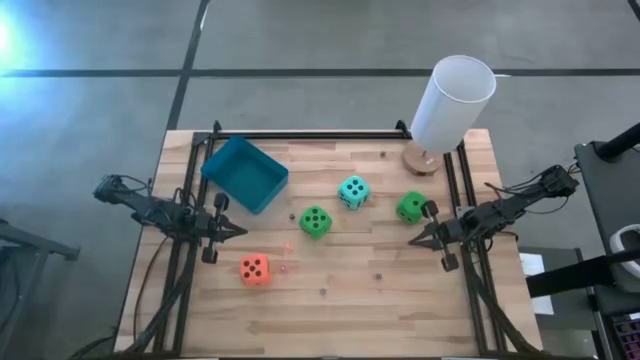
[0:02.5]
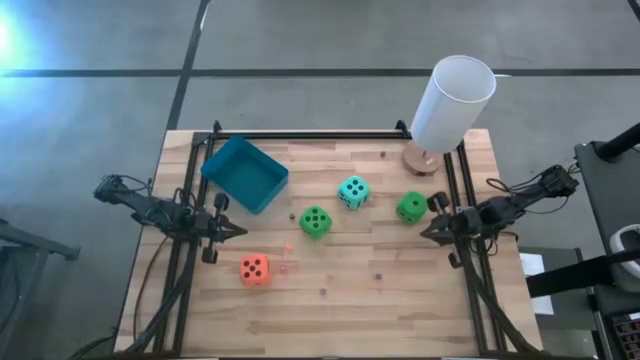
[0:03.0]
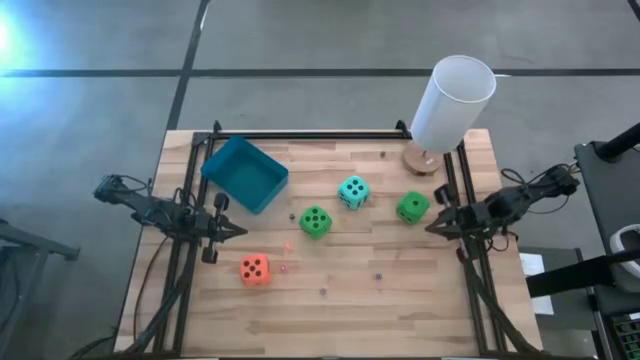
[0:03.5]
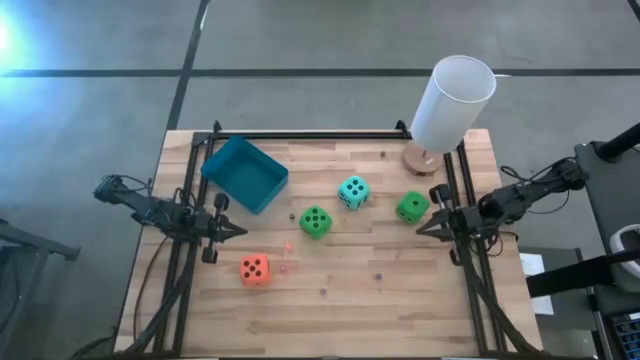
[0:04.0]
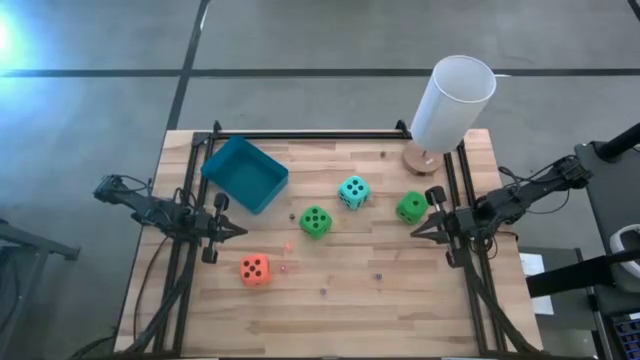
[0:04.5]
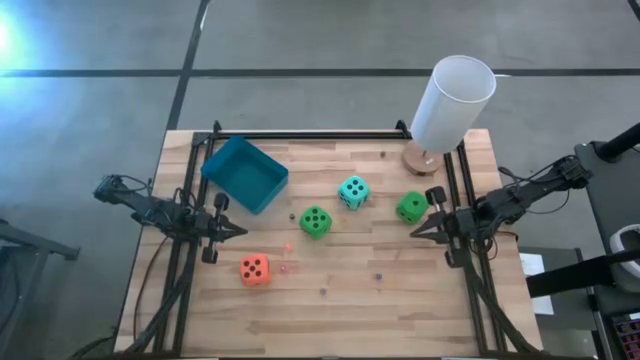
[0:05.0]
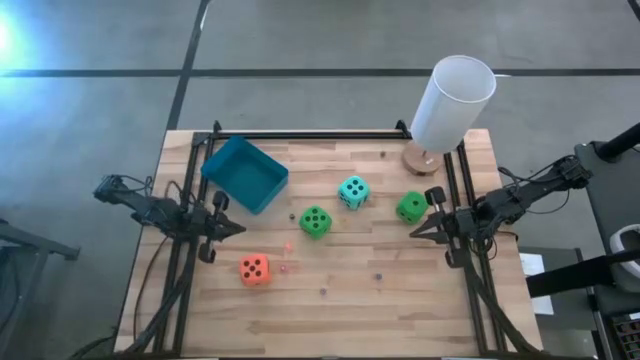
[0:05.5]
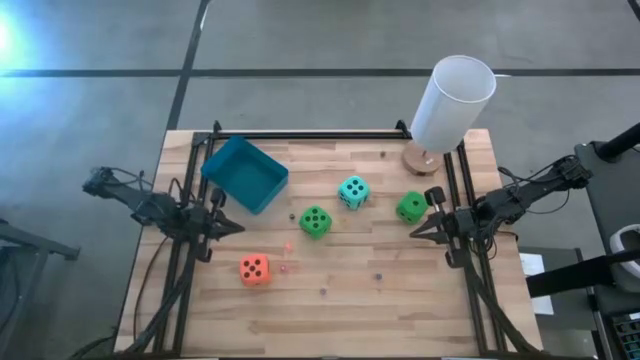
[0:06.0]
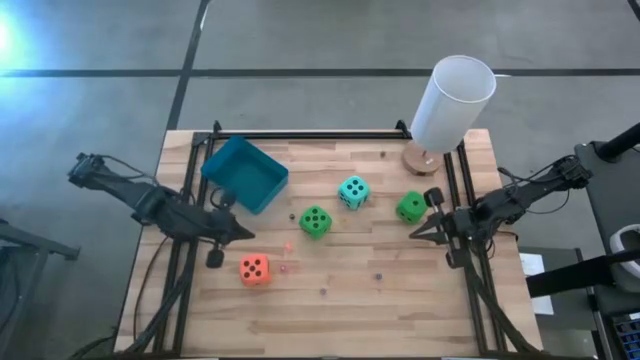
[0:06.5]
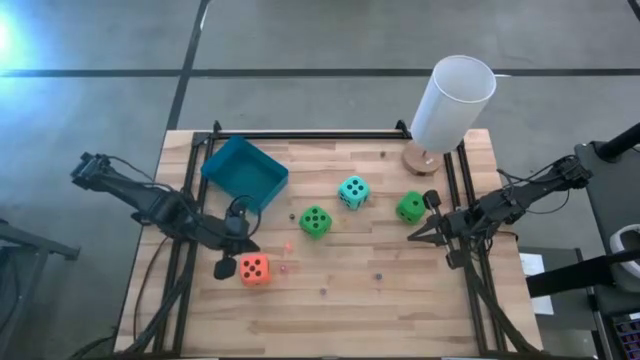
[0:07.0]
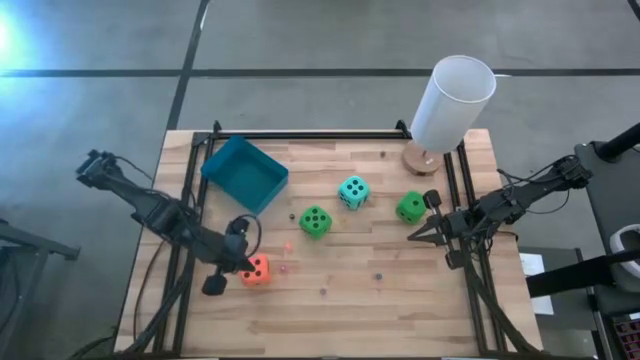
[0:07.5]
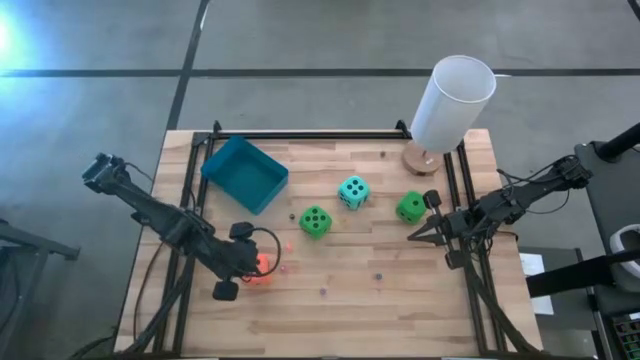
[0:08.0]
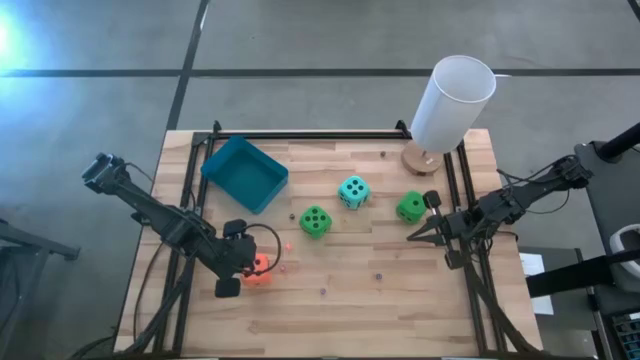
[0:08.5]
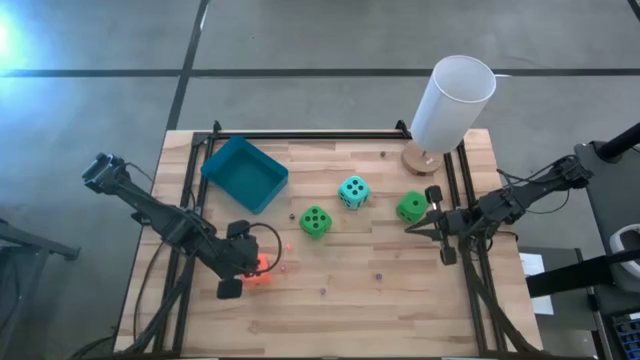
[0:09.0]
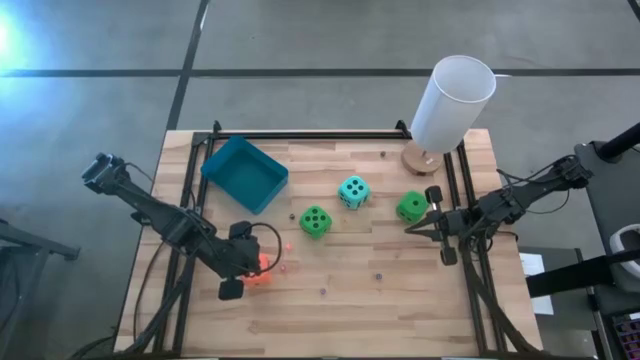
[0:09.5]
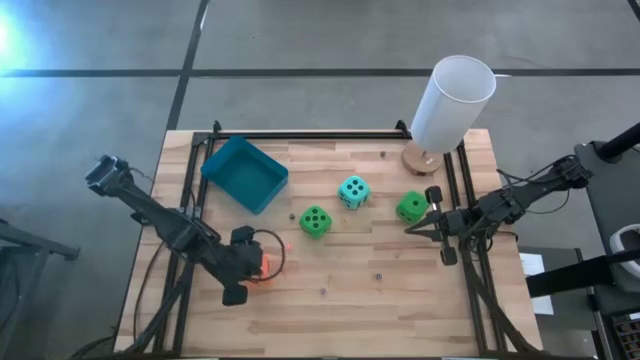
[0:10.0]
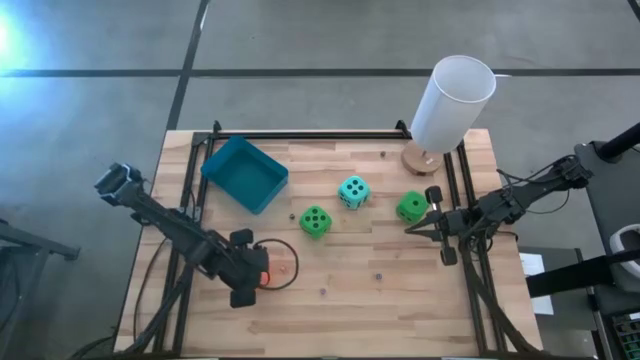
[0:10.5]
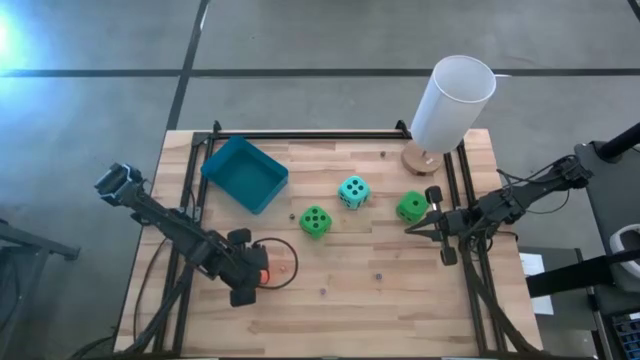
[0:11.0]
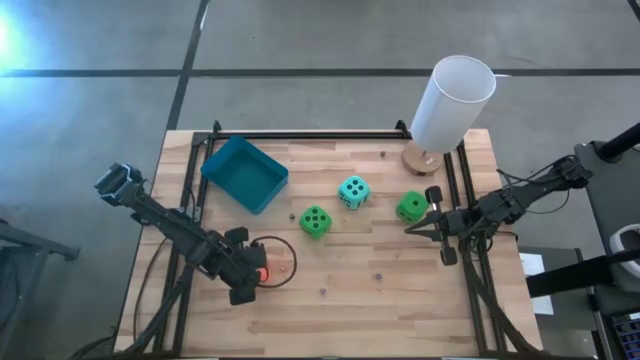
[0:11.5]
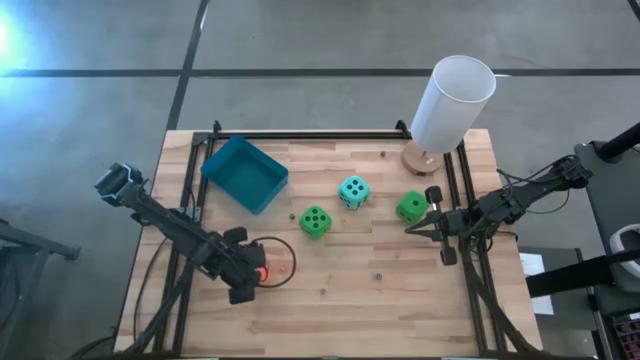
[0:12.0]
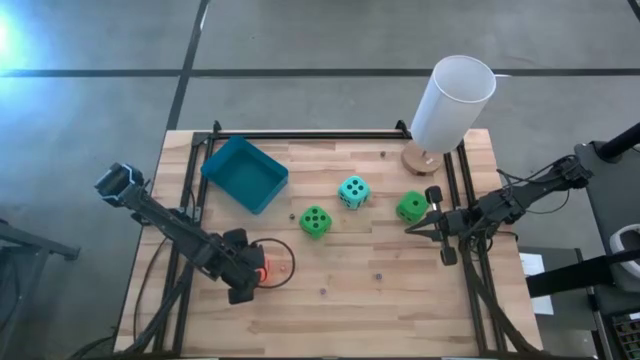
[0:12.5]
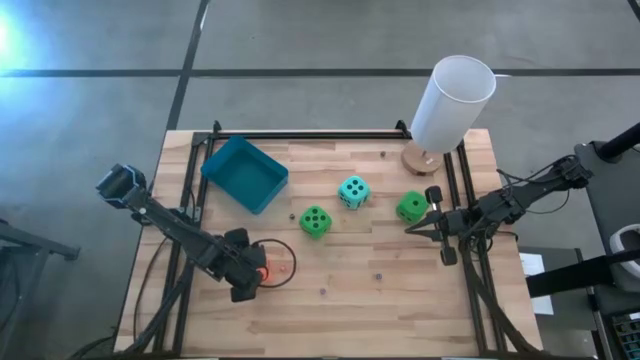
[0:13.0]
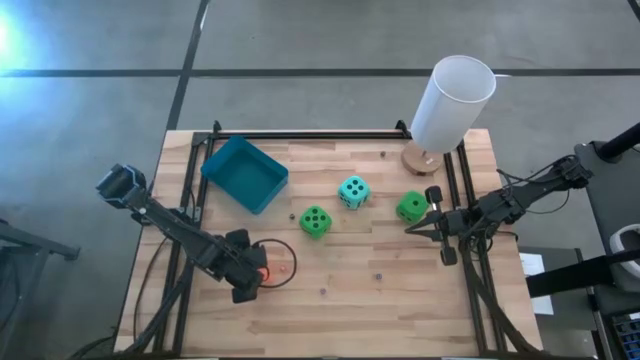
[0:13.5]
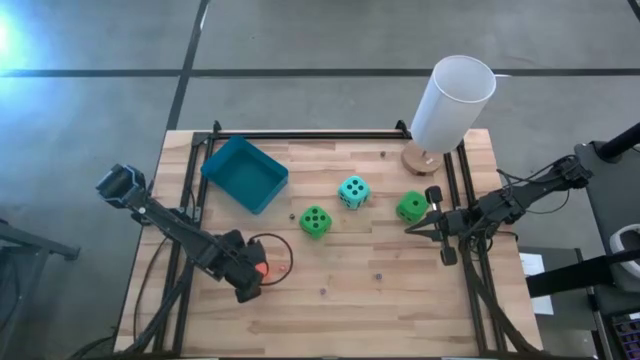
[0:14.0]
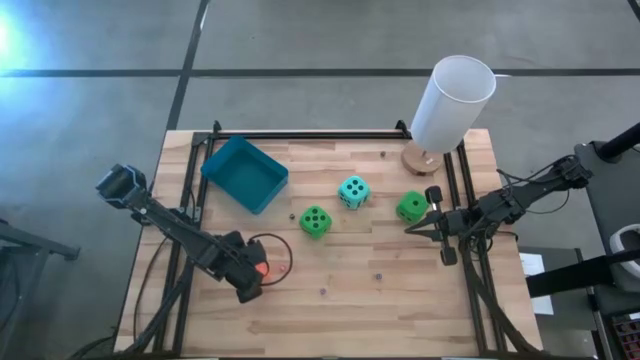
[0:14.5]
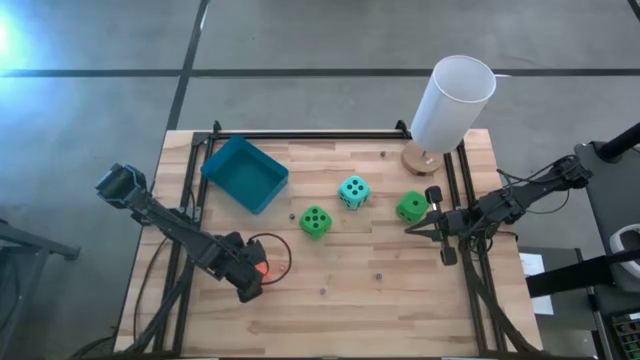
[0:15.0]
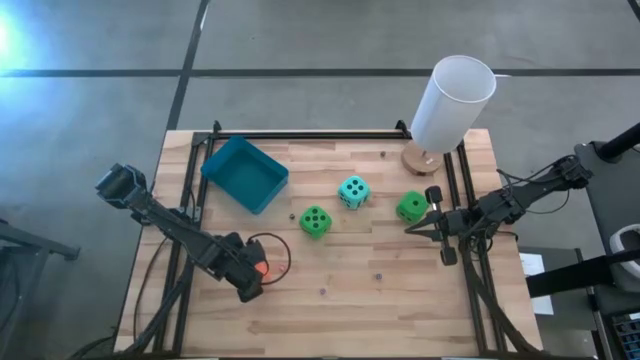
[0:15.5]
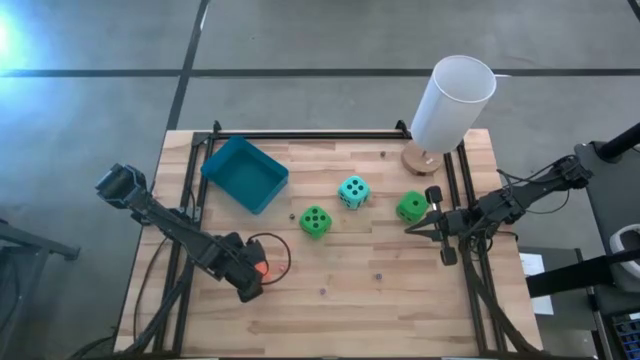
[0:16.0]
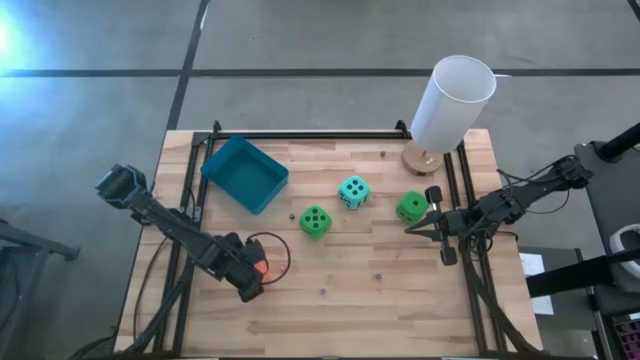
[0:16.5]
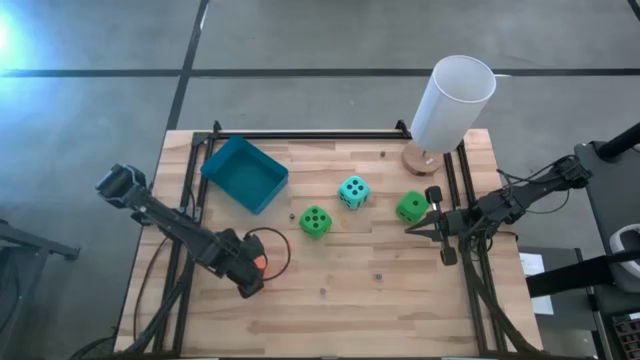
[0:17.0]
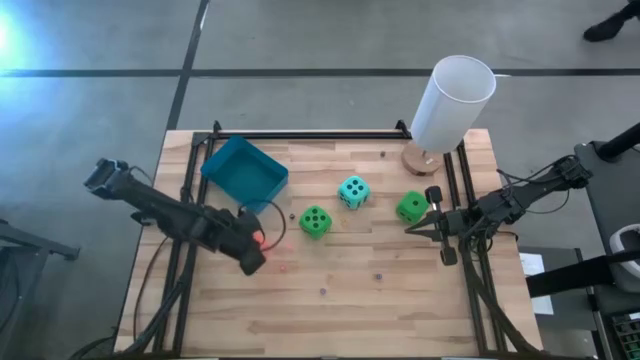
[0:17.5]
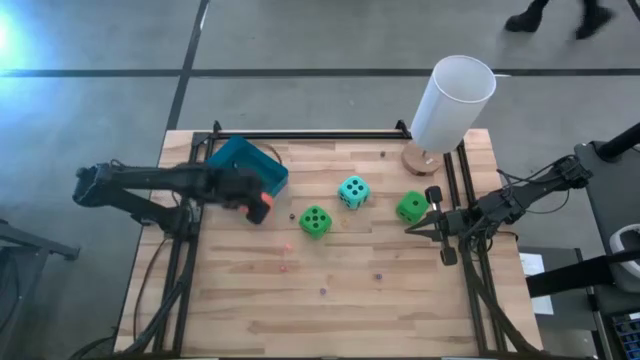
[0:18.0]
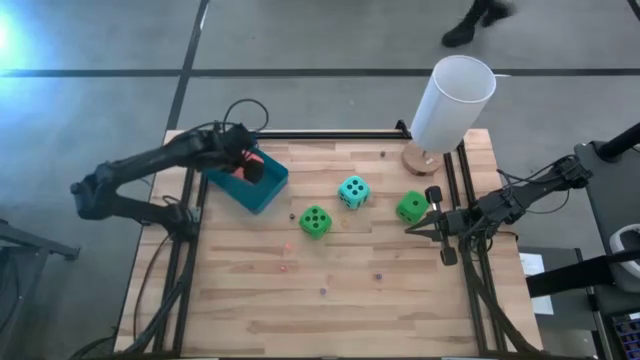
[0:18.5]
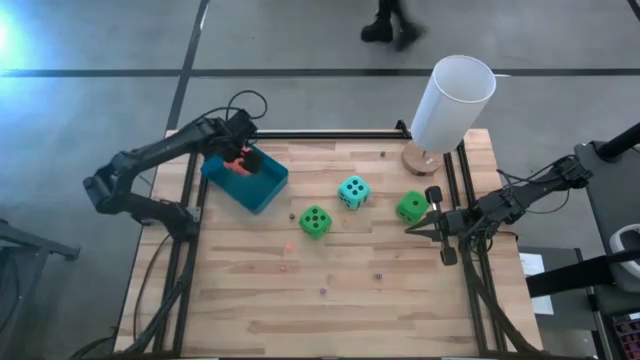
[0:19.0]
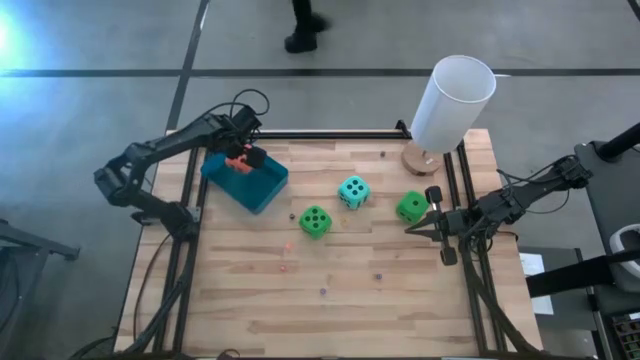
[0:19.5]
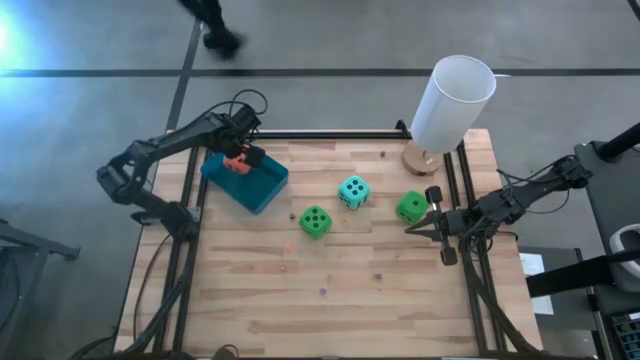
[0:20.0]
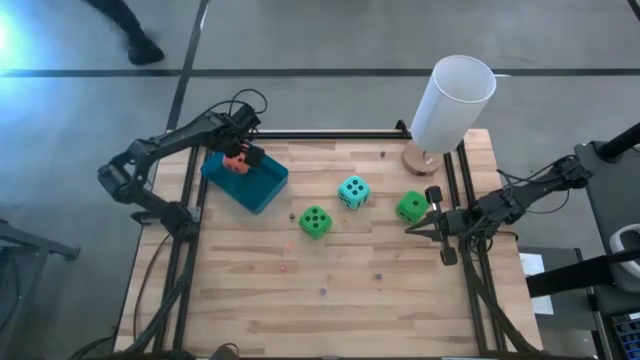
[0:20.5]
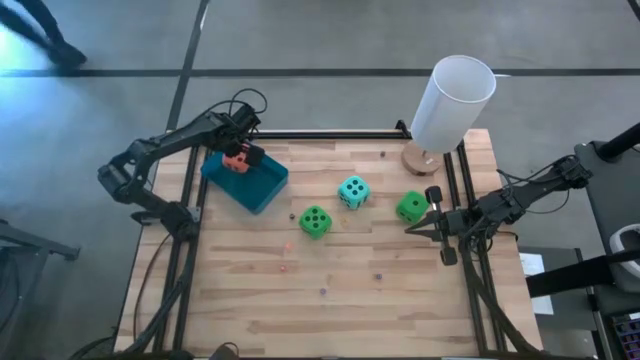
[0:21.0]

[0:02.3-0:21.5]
Task: Pick & Place Dice
Put the big orange dice into the blue bin

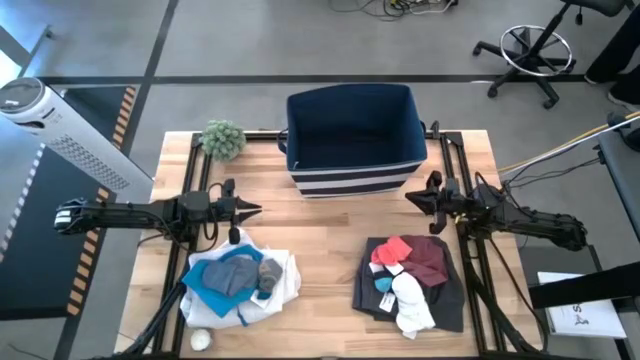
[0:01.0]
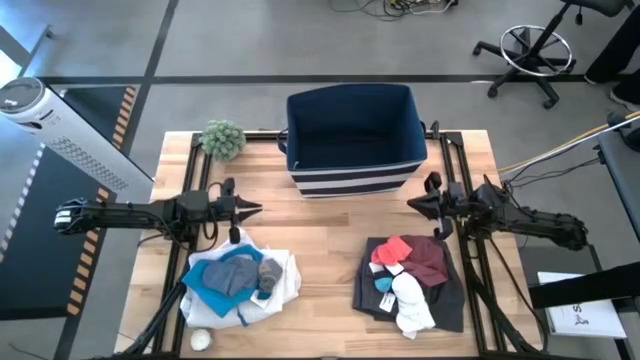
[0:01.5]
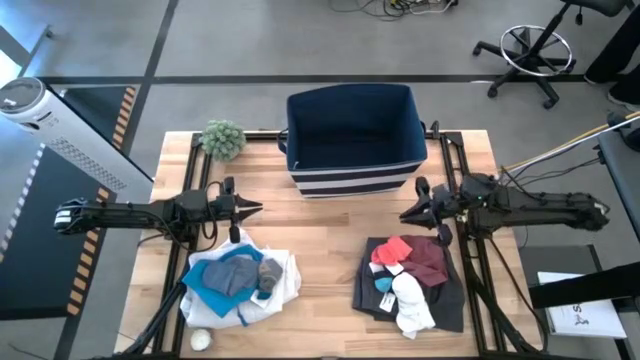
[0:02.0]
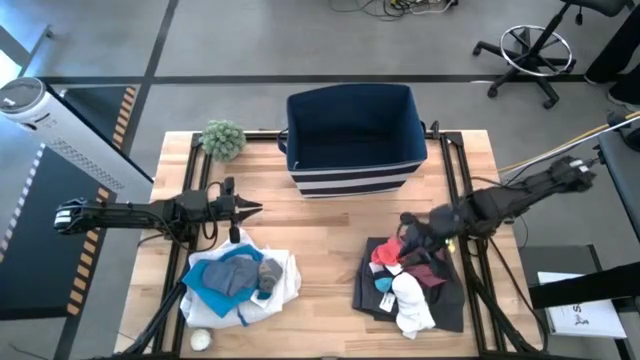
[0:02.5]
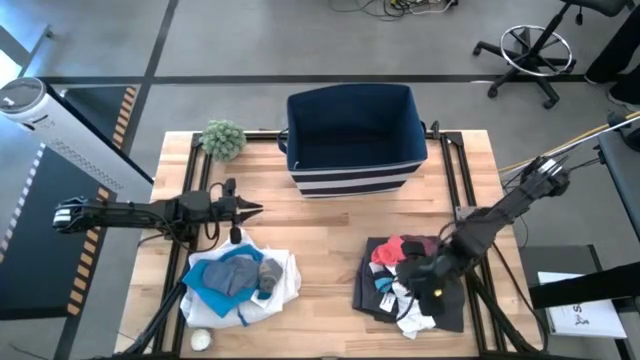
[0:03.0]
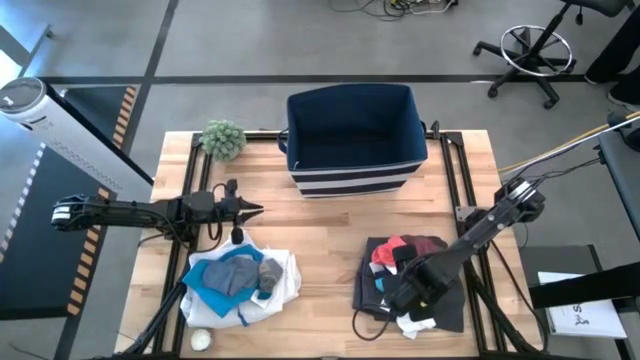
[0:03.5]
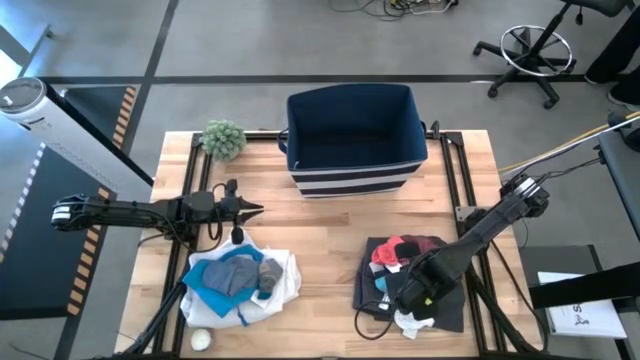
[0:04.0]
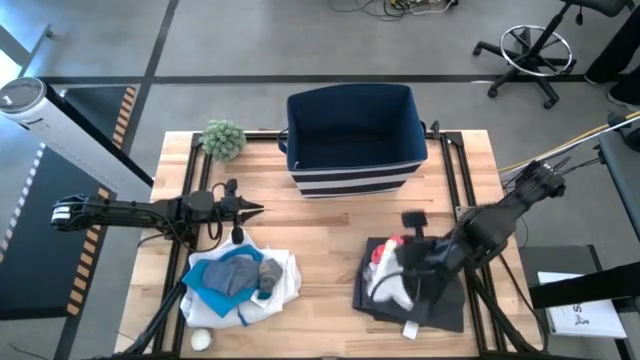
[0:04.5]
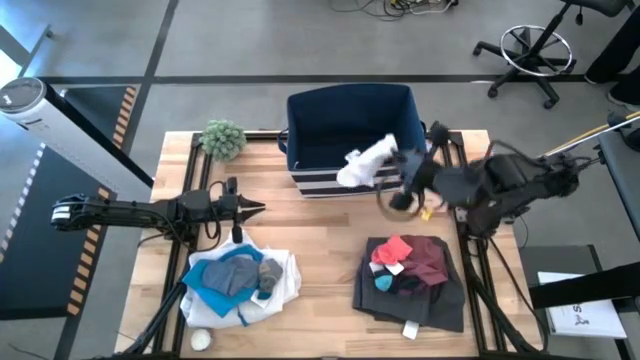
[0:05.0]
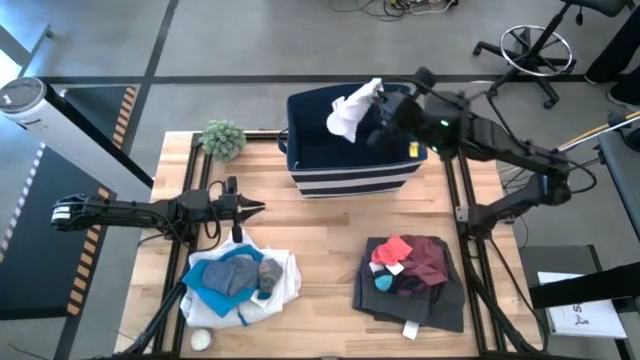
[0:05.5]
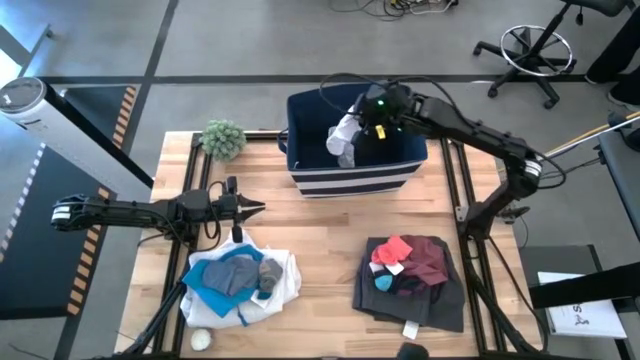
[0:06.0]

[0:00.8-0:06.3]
Task: Sort clothes
Put the white pair of socks into the blue laundry bin
